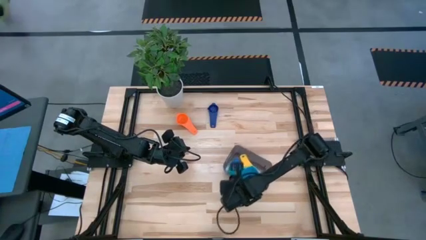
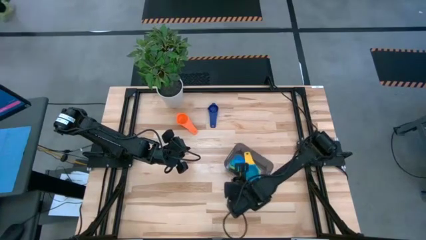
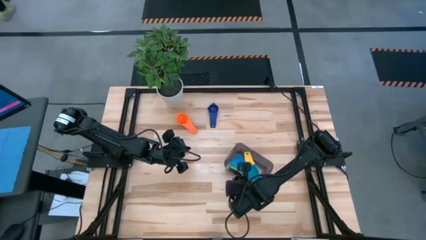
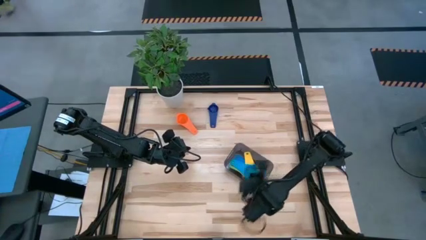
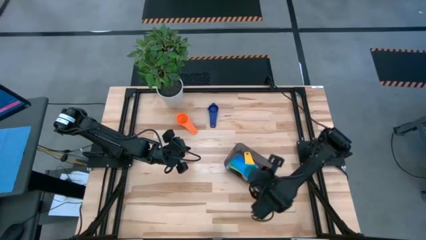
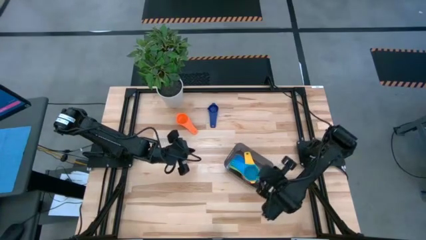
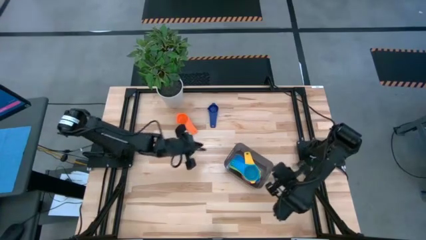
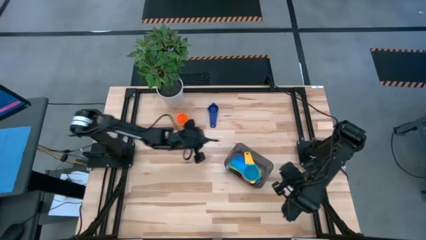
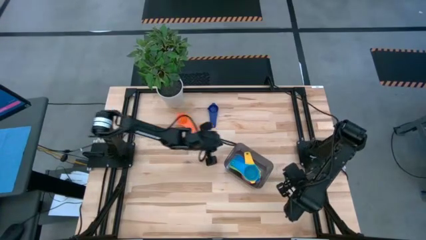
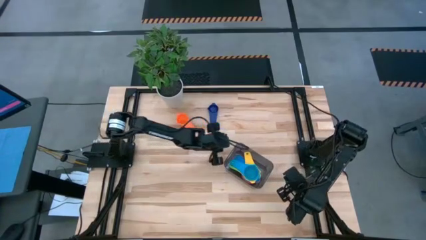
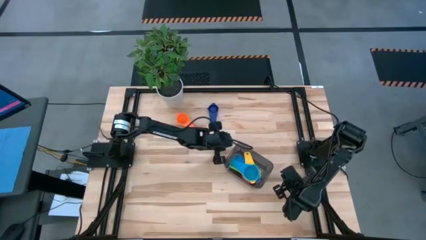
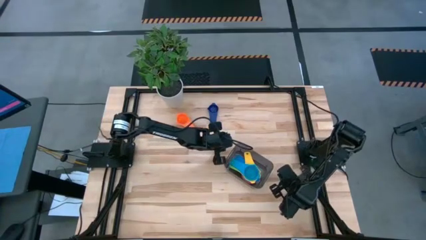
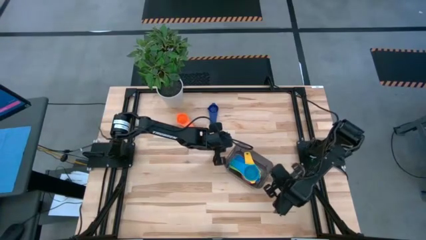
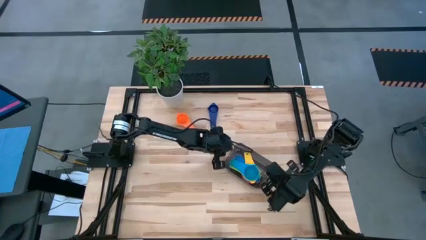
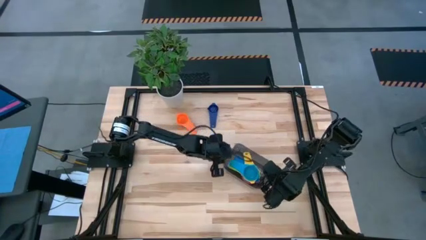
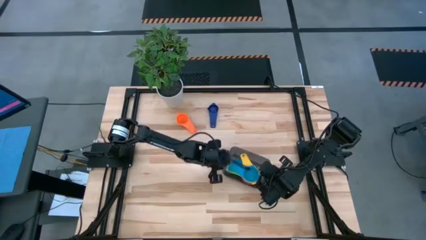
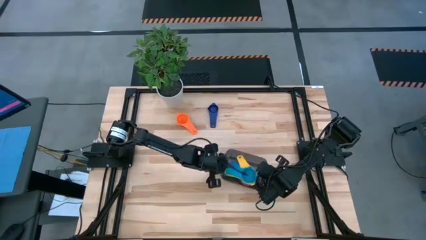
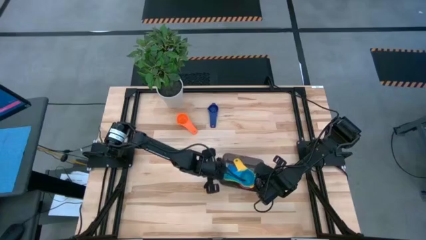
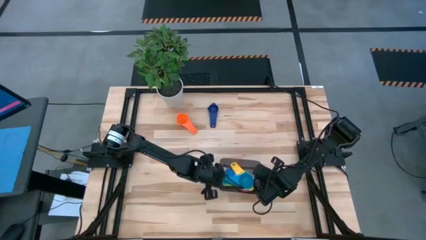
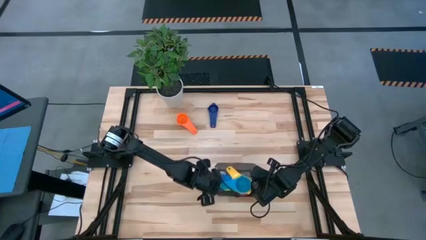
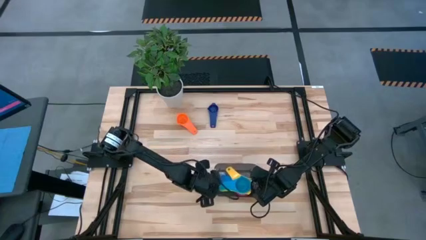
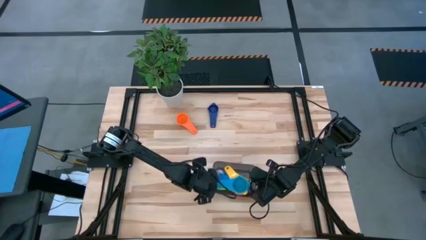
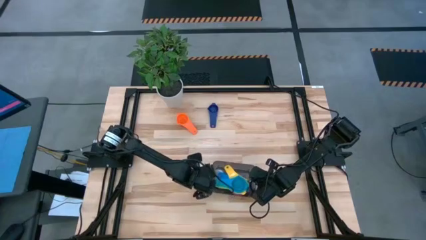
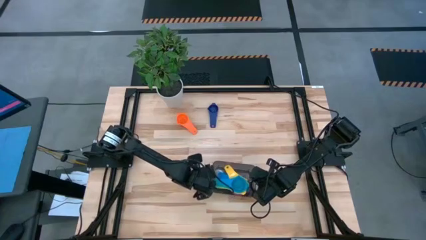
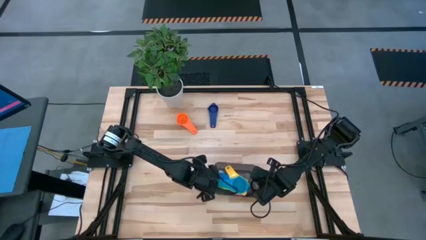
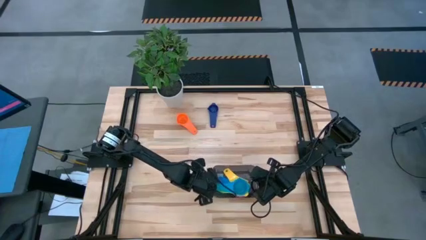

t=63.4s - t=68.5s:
Task: Nest measuring cups in basket
Adjust the black bin to the

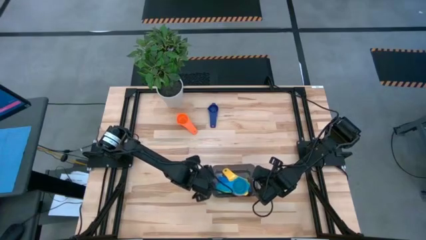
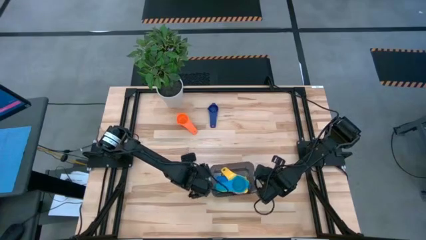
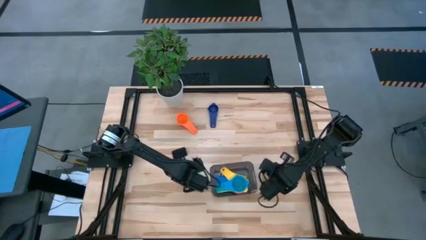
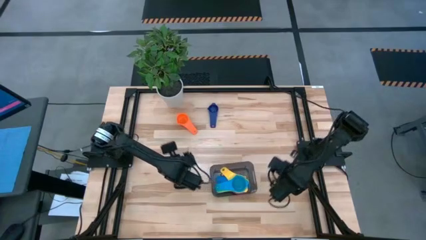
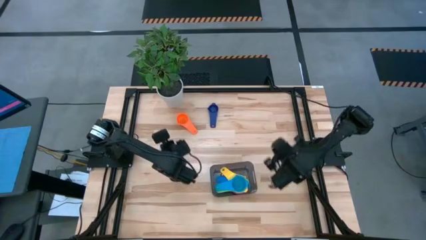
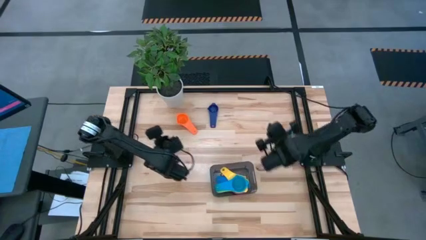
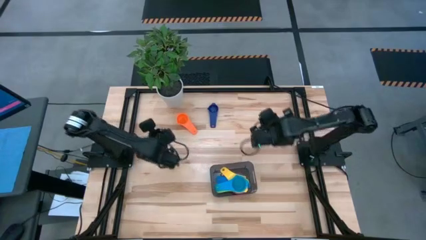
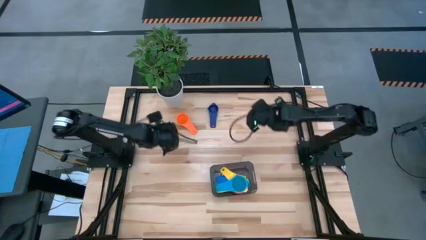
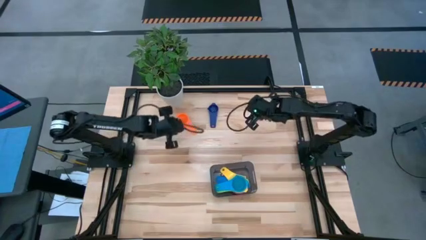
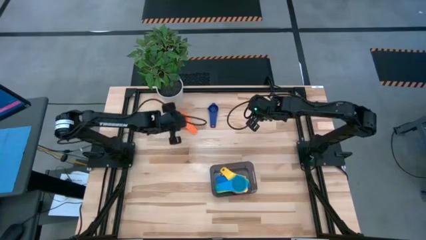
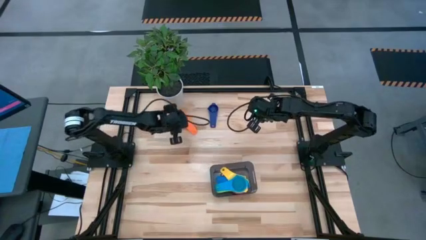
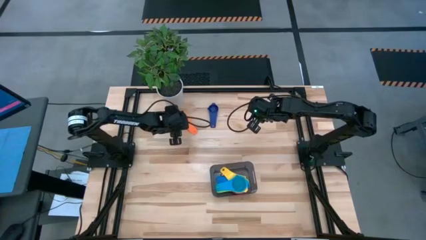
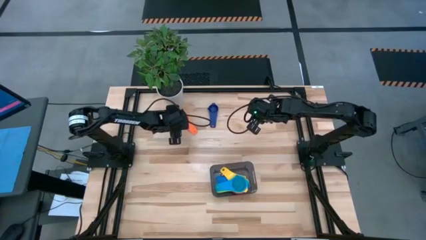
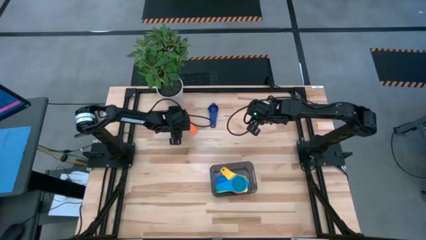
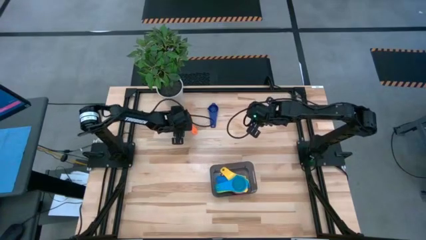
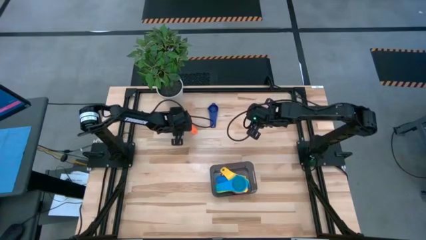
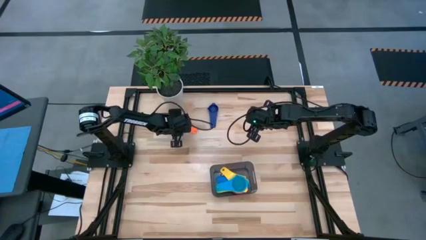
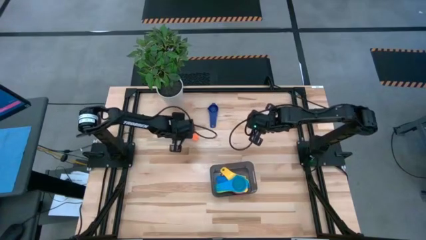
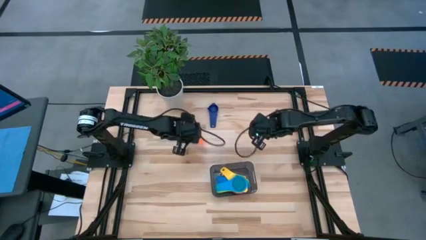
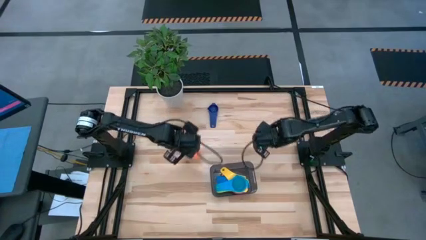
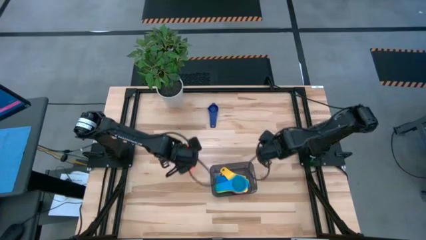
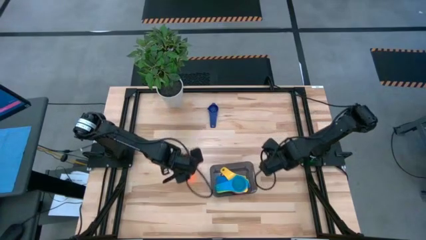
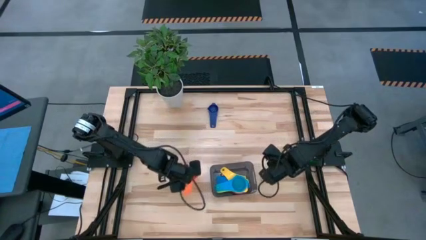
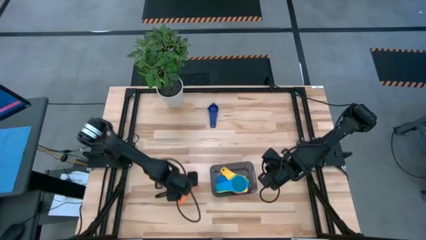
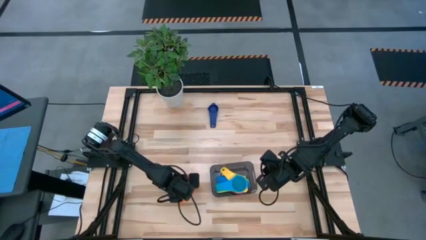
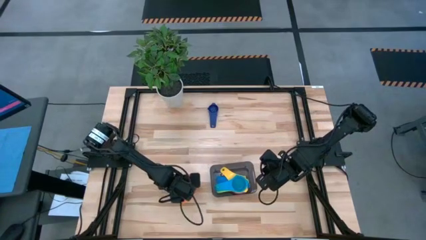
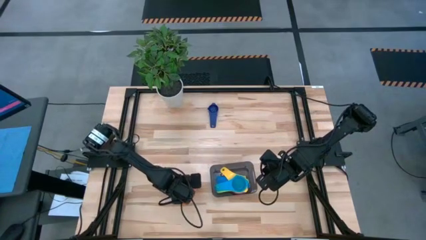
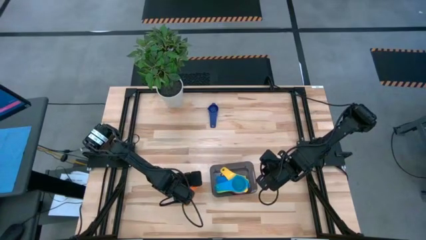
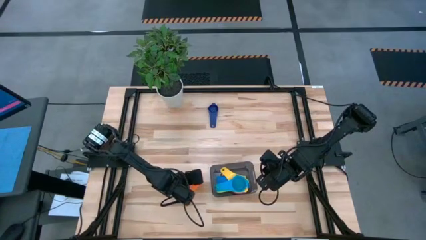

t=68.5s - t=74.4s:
Move the orange measuring cup to the left of the black bin

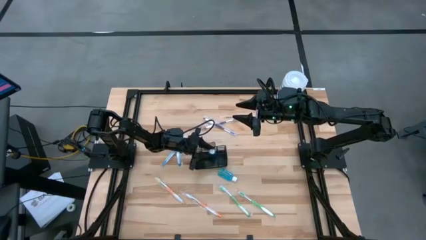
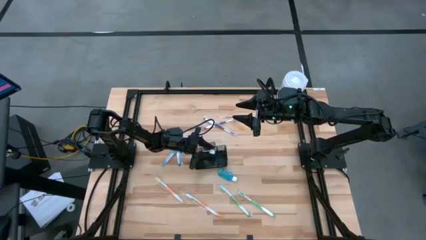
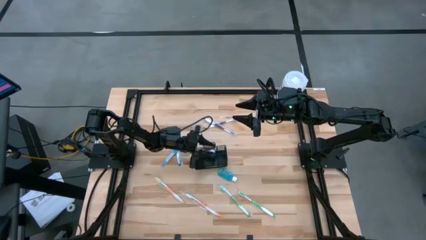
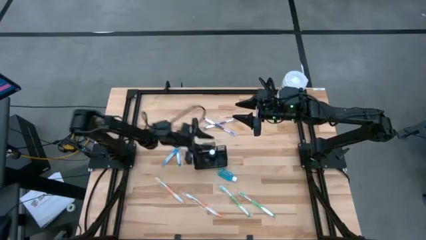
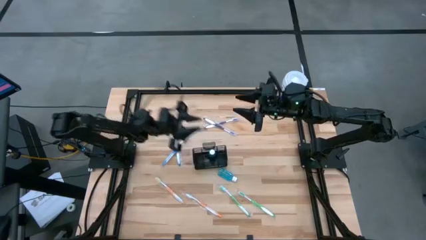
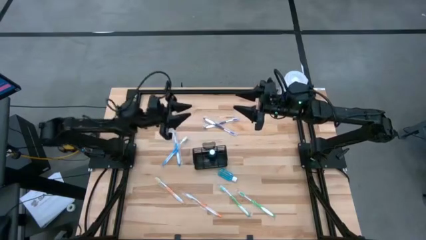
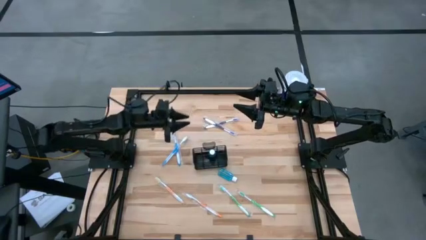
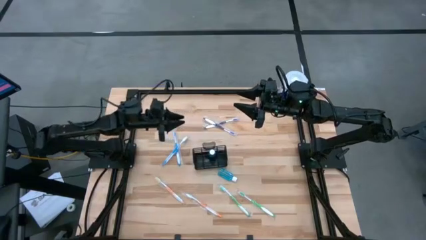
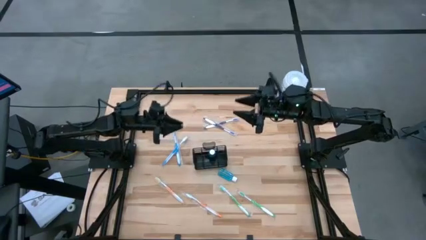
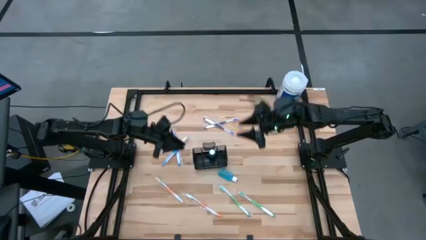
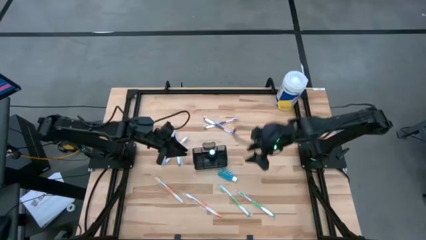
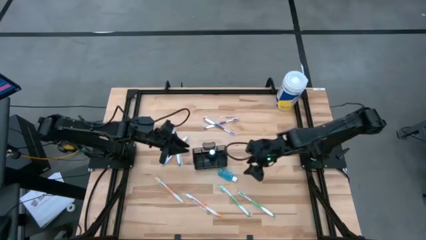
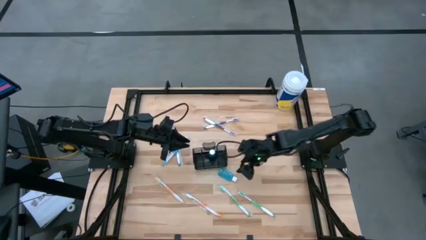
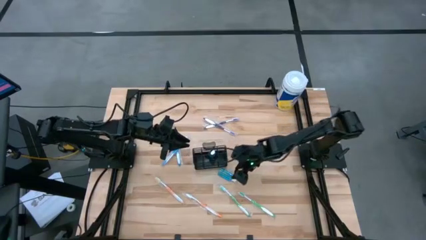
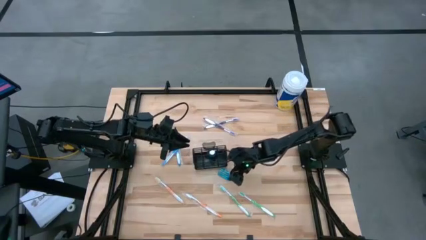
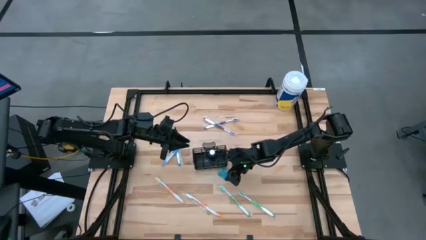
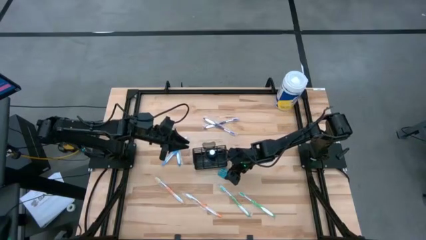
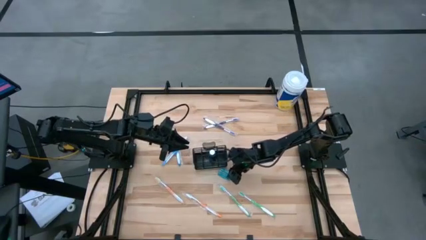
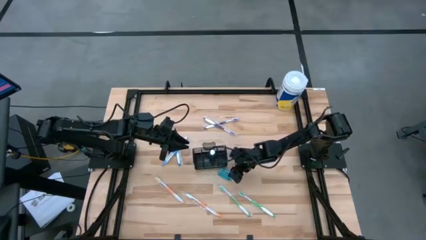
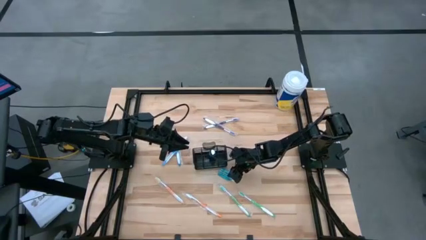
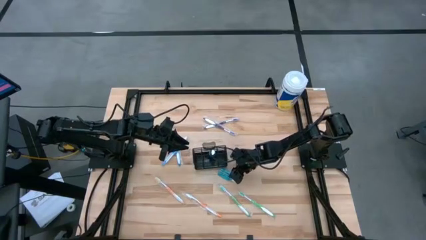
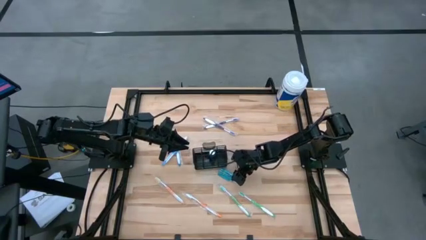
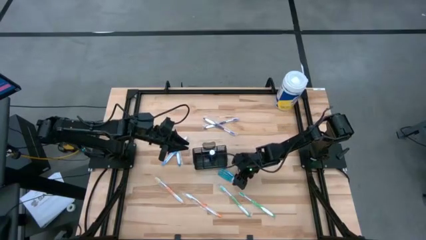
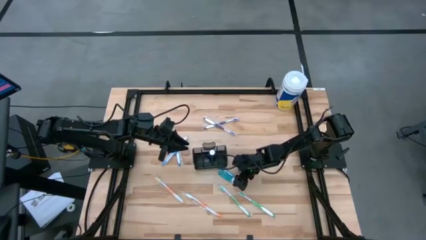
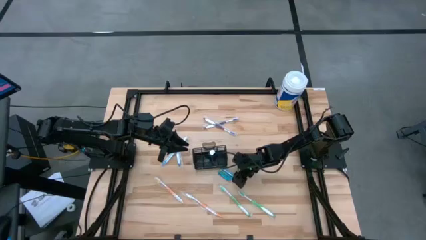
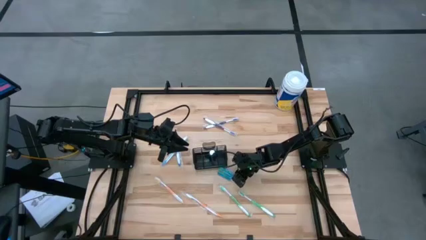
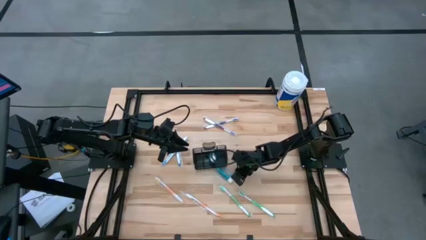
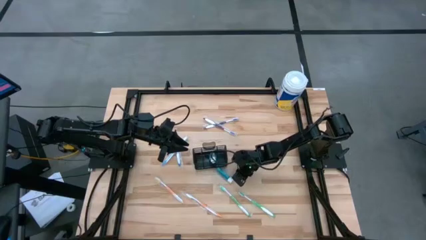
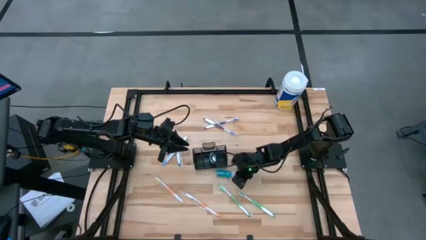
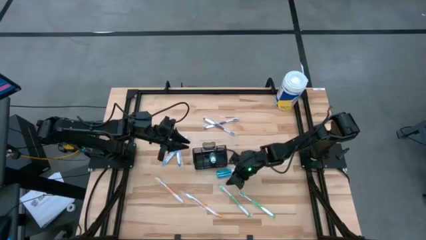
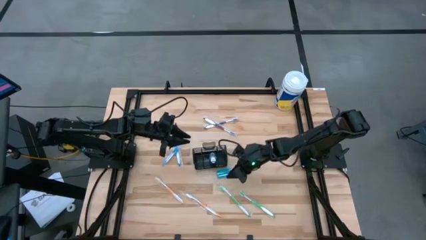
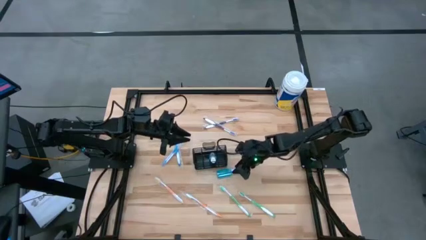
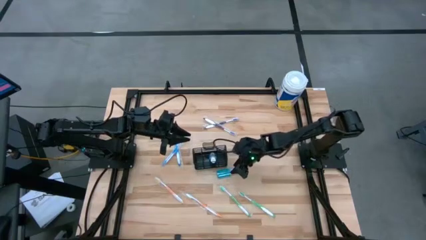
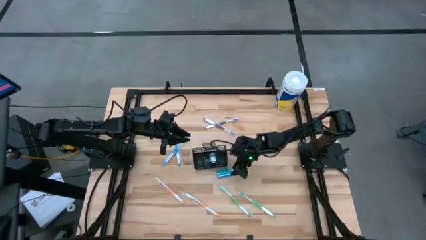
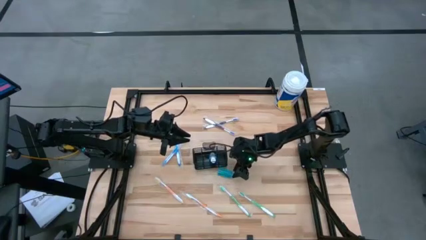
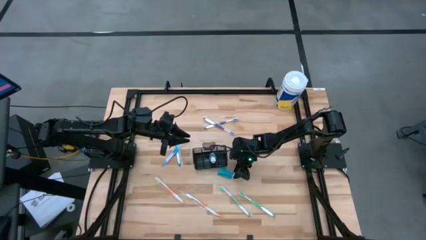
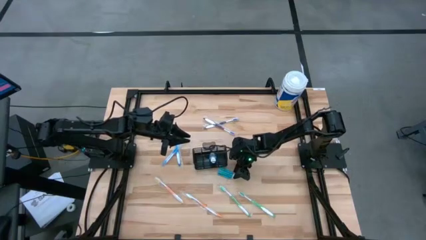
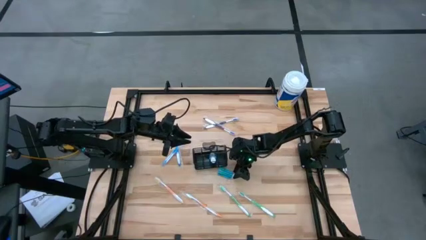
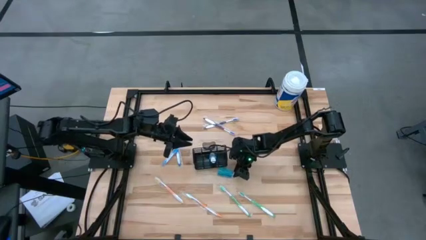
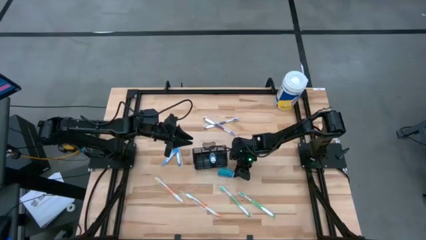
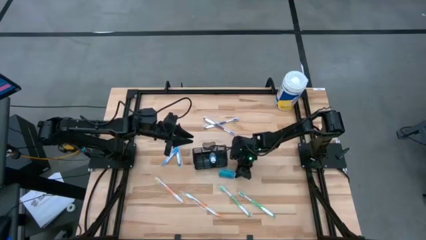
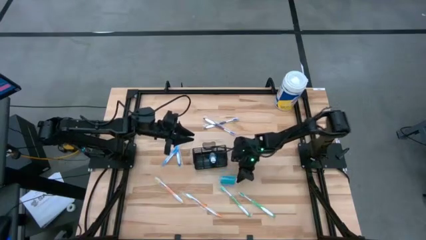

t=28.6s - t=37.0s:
Task: Pick & Place toothbrushing station
Put the blue mouthwash into the mesh organizer
